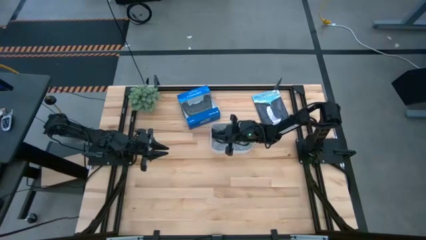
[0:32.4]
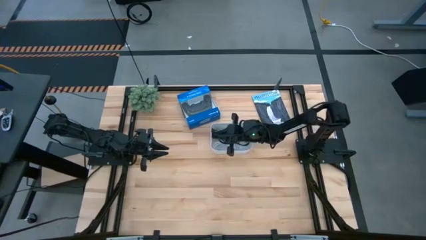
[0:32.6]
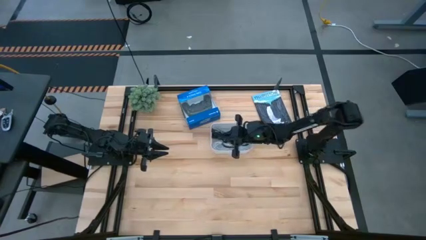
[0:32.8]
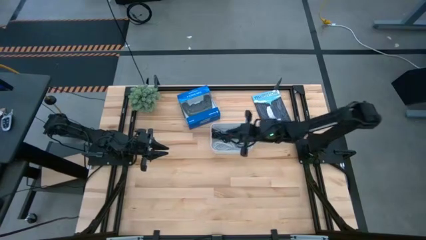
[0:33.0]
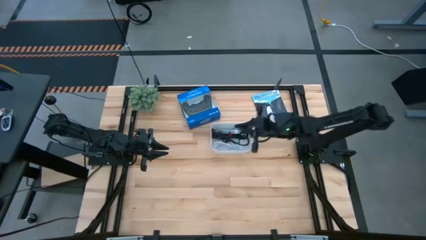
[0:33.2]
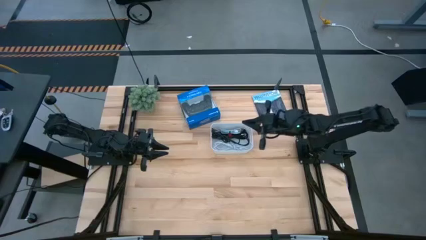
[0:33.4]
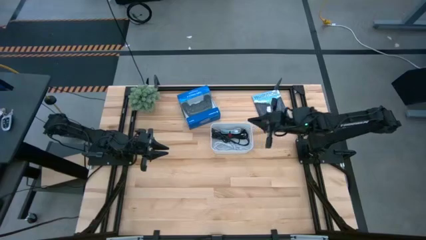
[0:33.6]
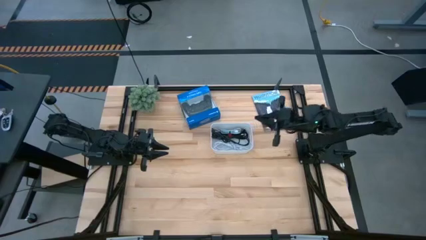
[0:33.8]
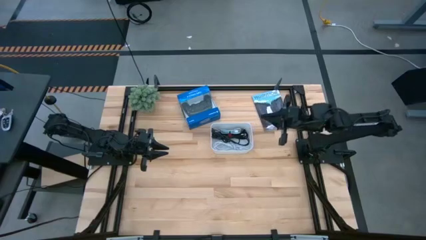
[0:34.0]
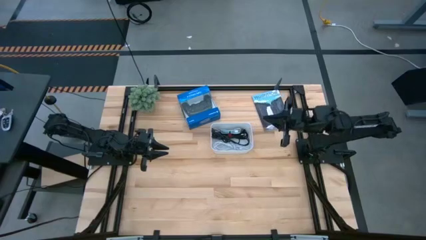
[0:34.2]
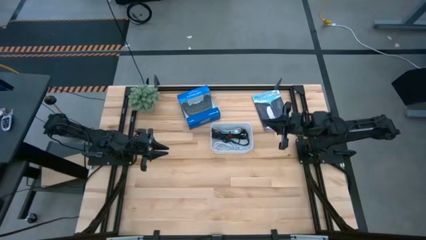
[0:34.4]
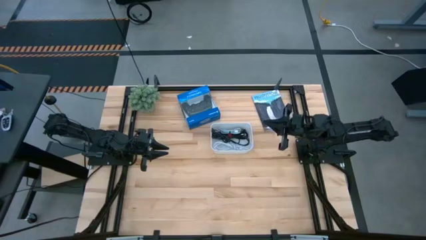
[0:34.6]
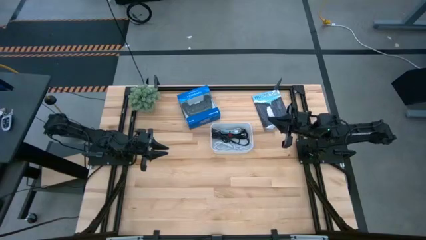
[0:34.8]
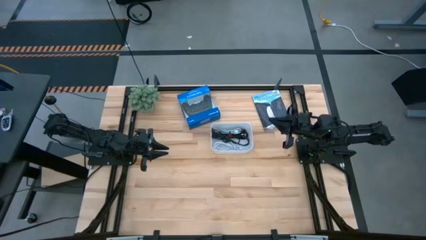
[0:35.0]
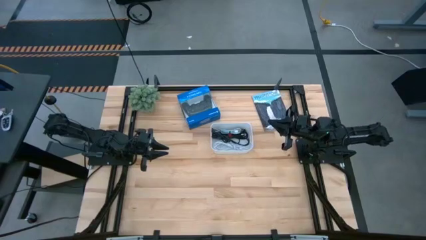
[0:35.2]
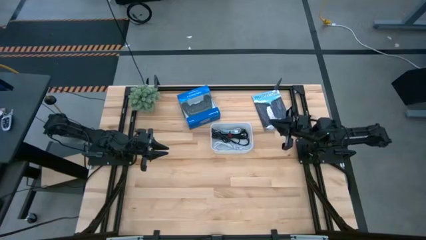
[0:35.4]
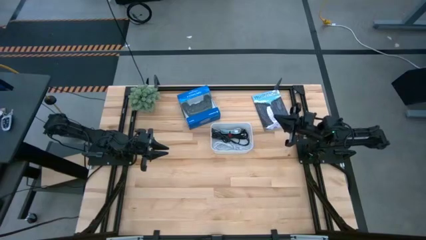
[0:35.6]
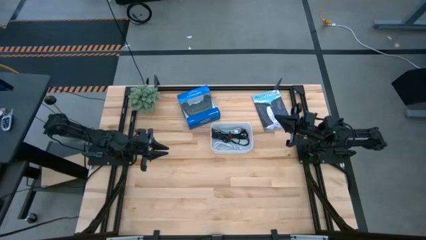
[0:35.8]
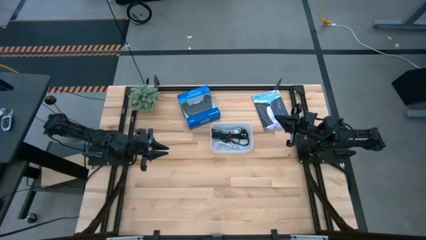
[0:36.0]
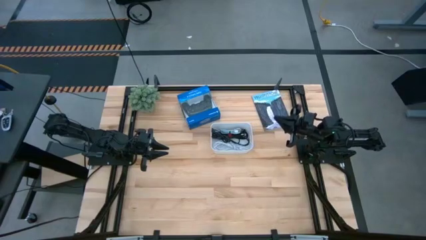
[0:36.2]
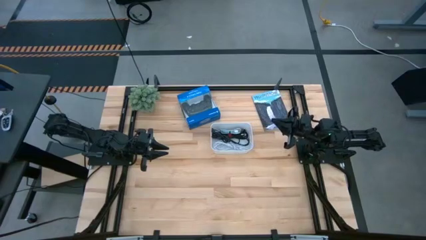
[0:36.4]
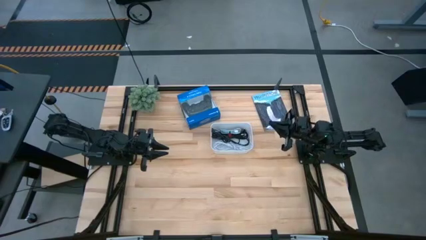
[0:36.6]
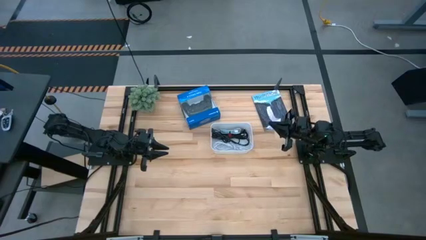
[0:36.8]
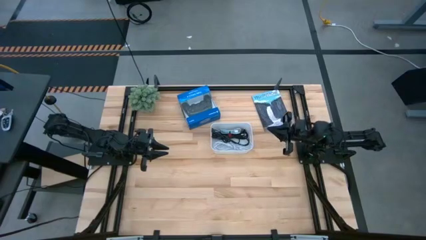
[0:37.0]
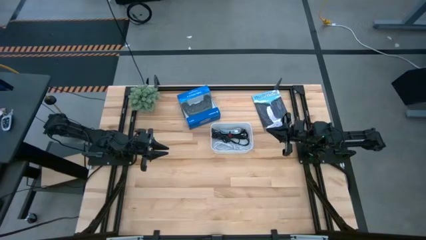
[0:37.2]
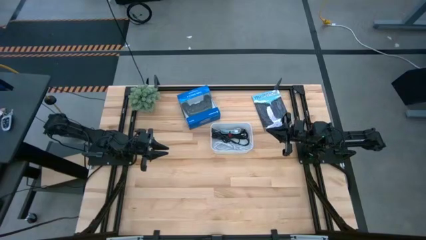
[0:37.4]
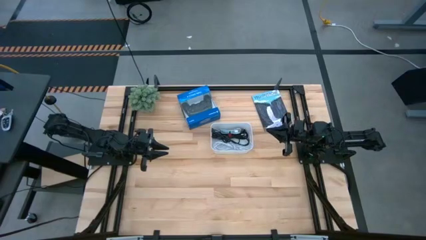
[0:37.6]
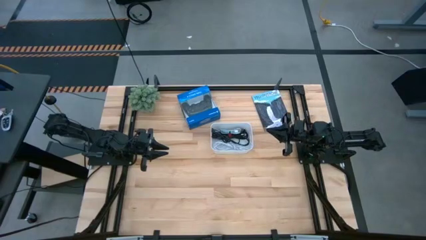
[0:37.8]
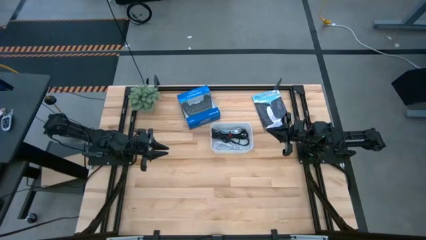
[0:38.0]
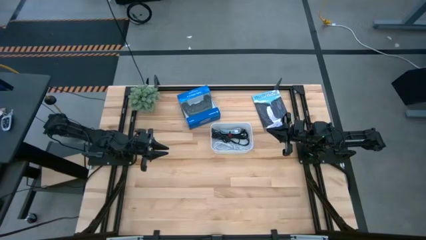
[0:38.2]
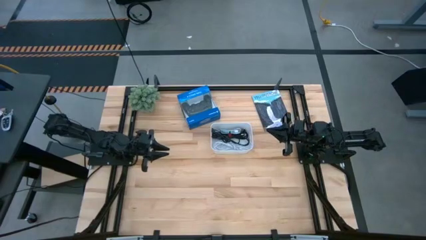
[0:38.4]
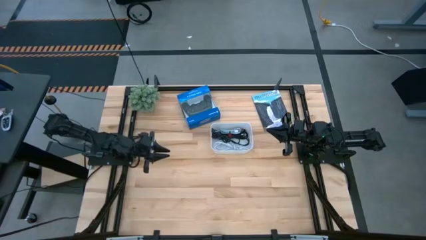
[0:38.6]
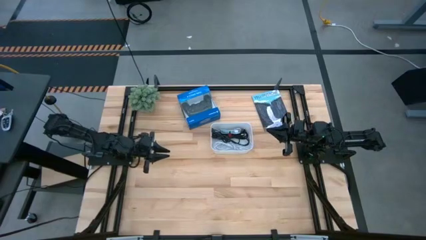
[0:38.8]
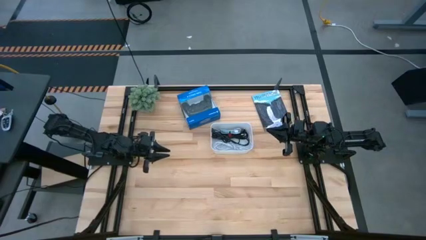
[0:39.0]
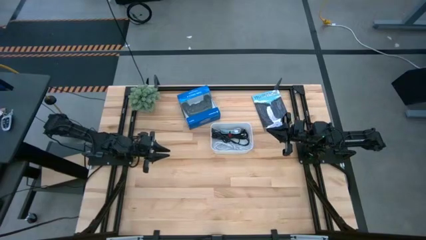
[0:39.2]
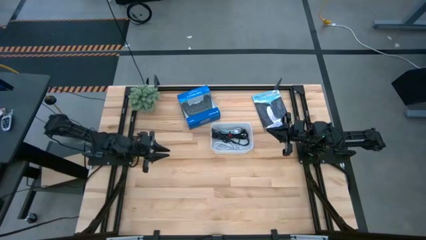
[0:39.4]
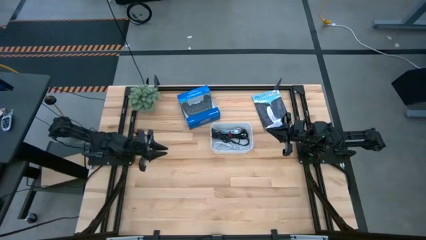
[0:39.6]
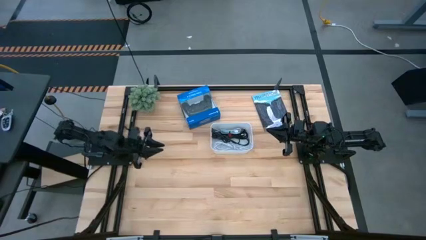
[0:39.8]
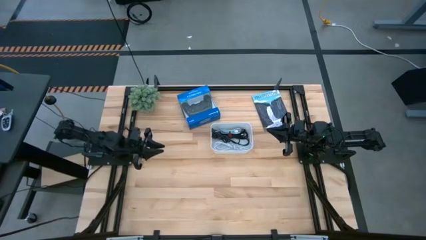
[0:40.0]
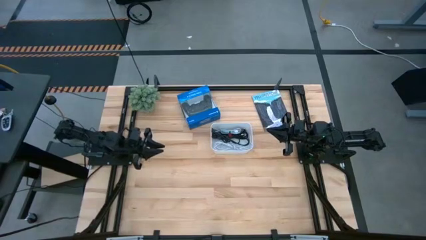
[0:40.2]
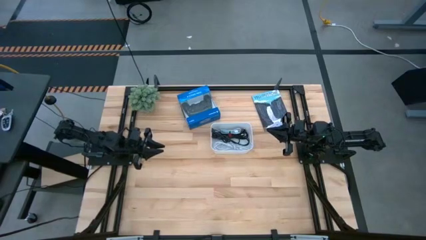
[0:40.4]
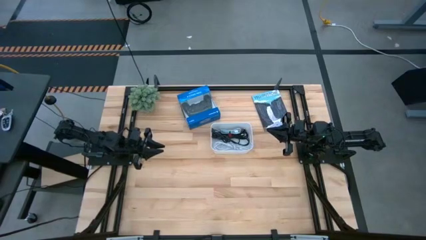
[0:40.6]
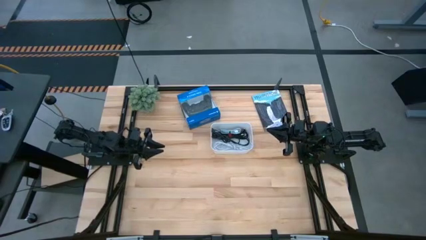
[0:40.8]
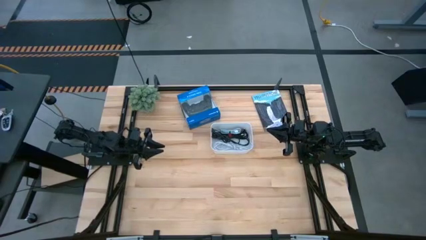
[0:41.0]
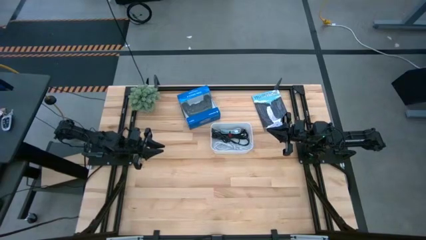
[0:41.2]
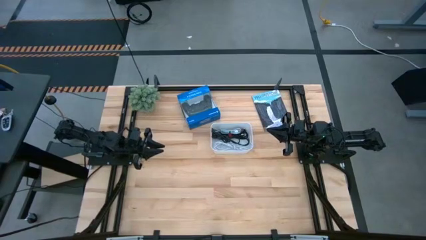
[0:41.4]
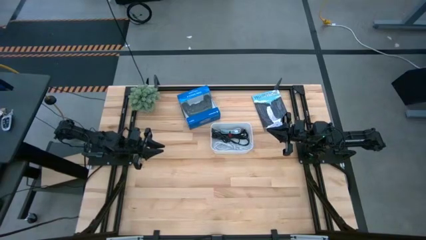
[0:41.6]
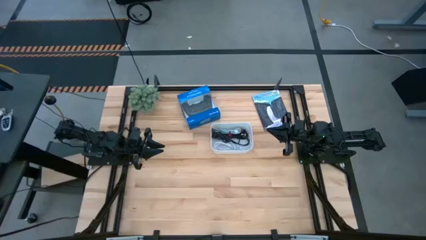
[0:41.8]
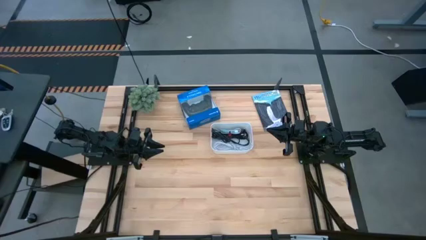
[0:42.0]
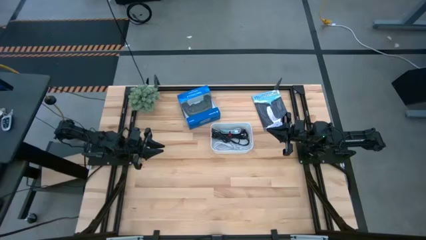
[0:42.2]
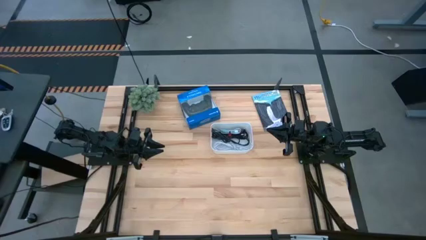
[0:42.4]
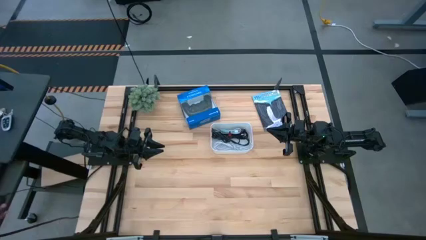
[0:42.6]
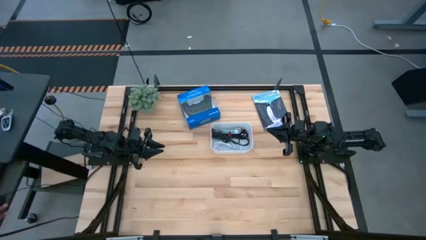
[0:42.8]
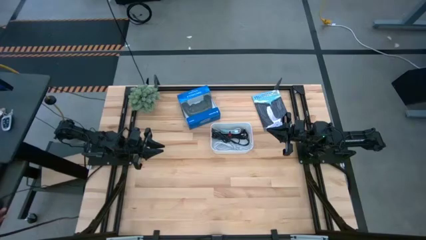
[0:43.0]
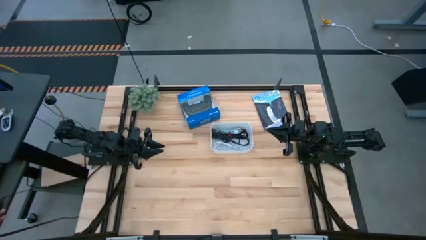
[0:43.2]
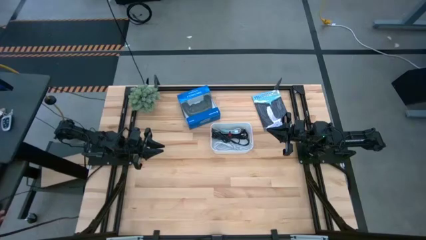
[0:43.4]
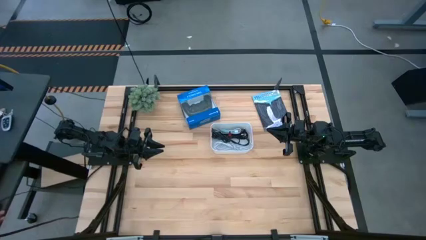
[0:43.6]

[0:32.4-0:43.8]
Task: Pick and place USB-C Cables
Return to Home Position
